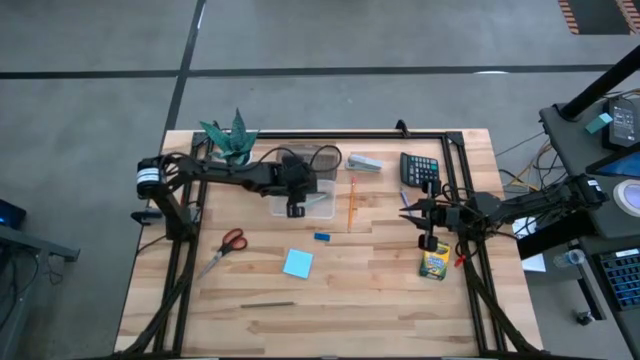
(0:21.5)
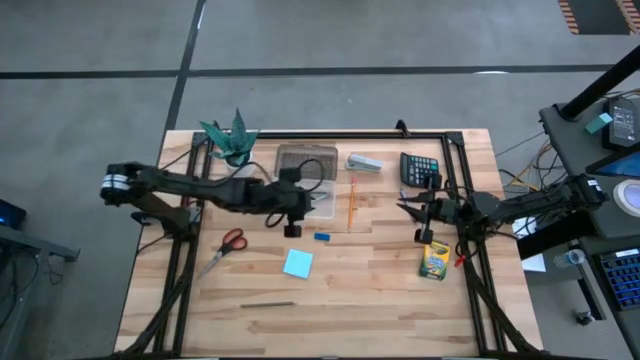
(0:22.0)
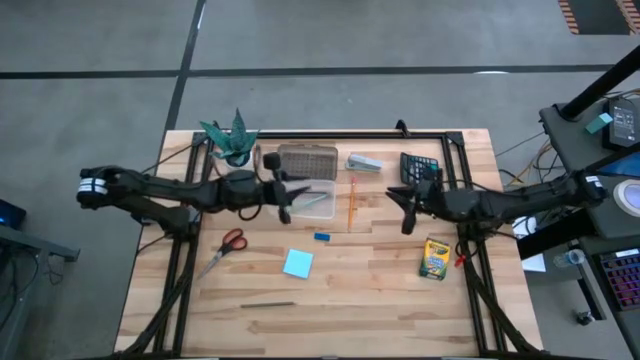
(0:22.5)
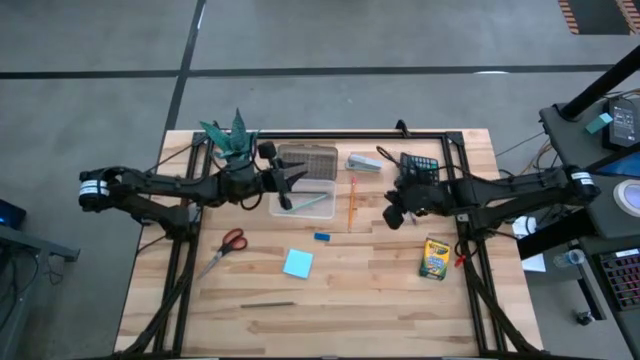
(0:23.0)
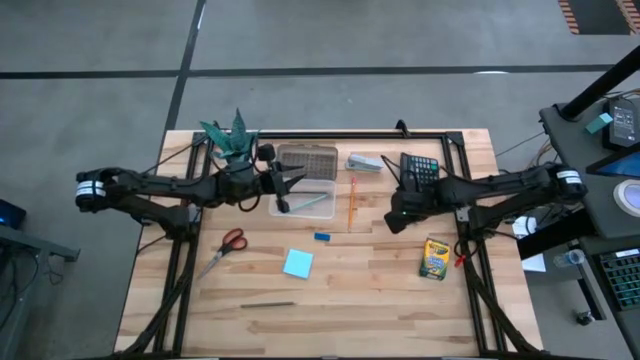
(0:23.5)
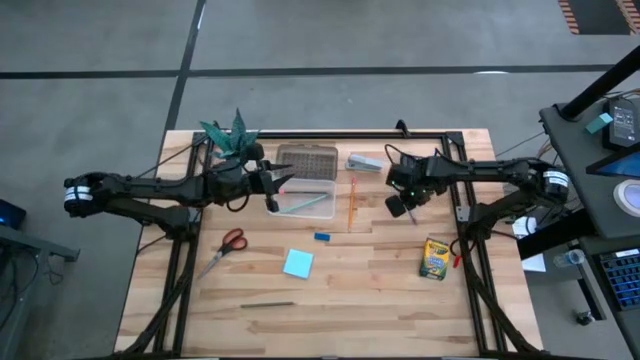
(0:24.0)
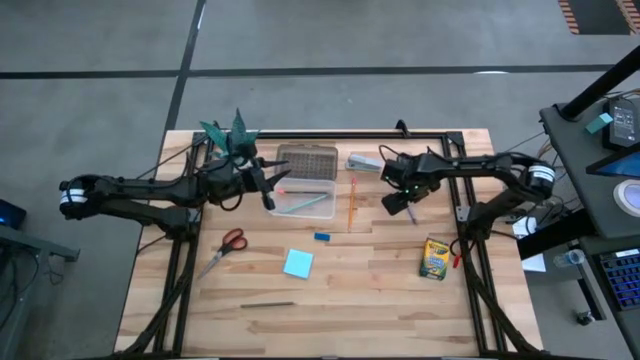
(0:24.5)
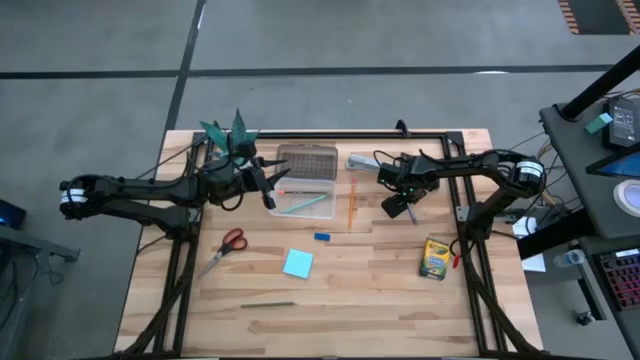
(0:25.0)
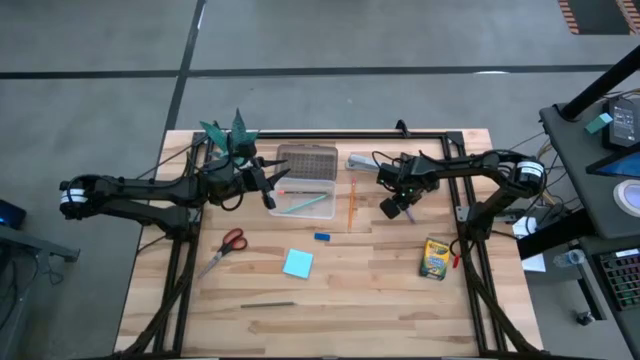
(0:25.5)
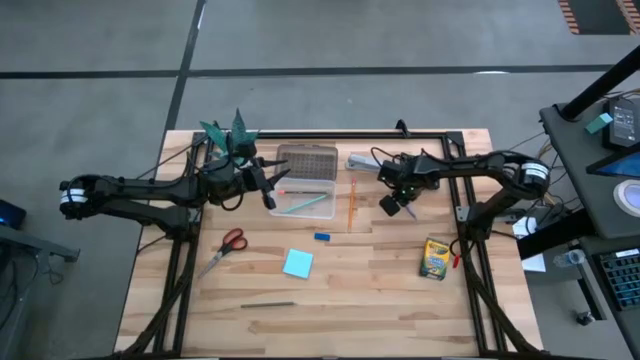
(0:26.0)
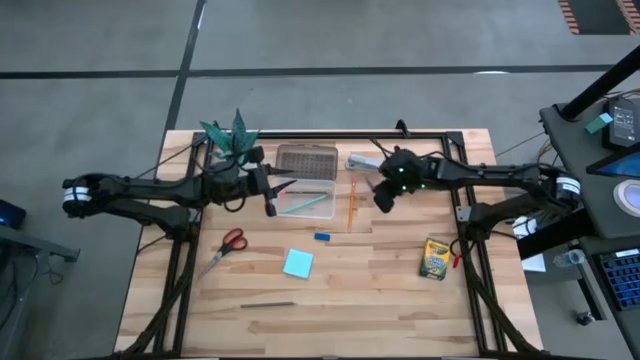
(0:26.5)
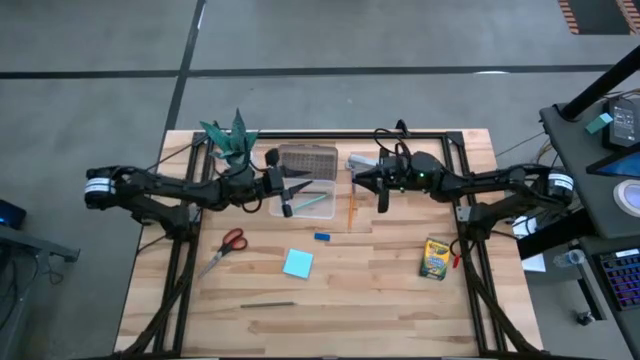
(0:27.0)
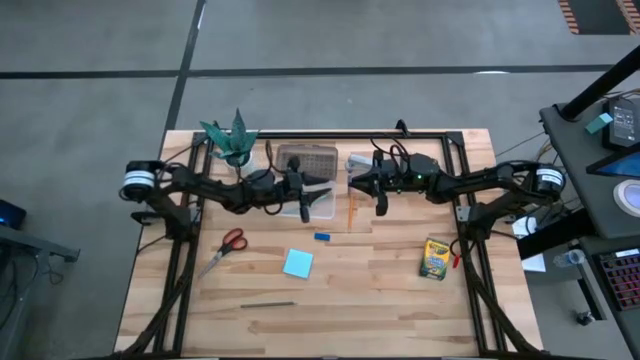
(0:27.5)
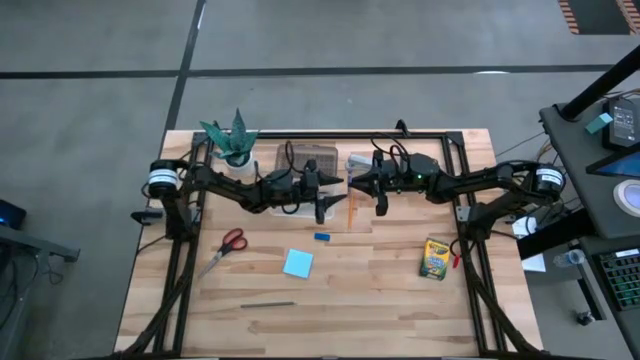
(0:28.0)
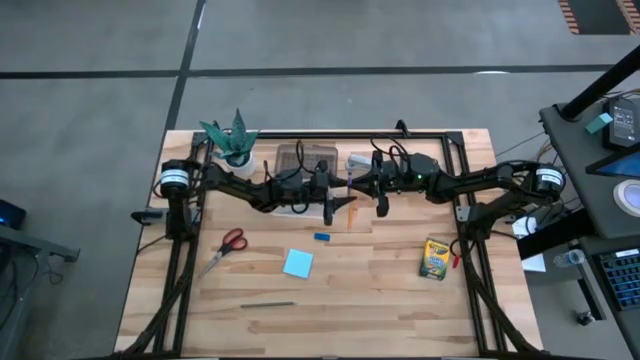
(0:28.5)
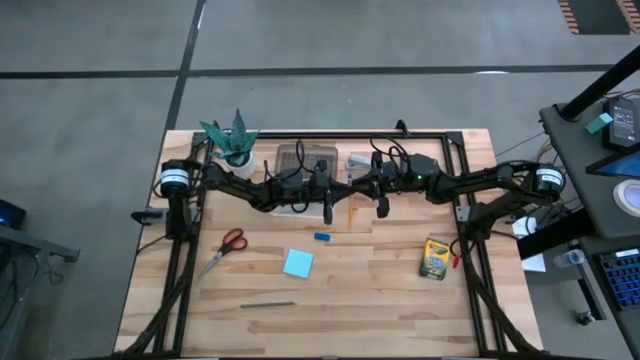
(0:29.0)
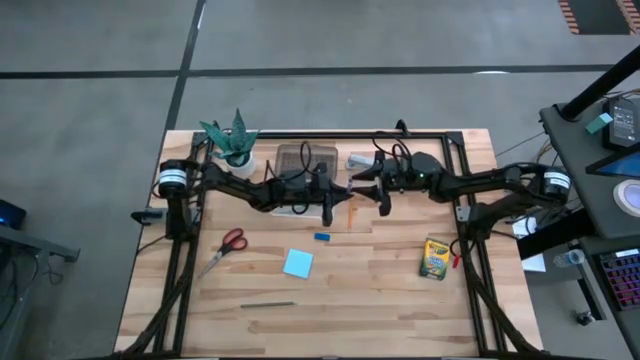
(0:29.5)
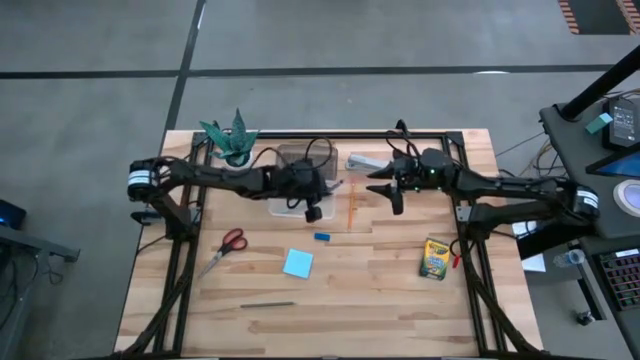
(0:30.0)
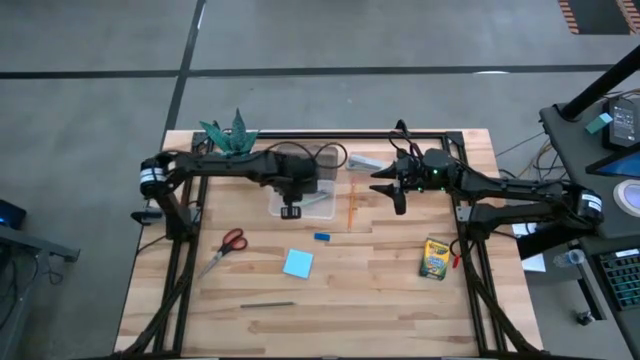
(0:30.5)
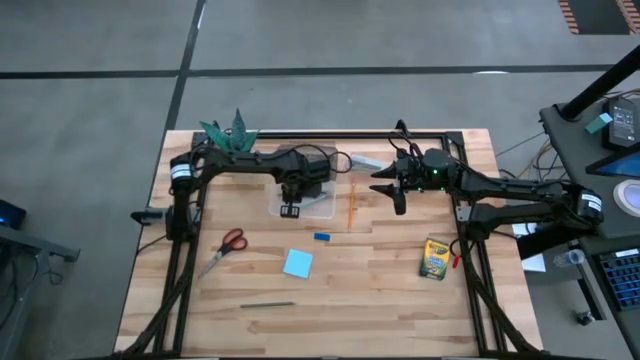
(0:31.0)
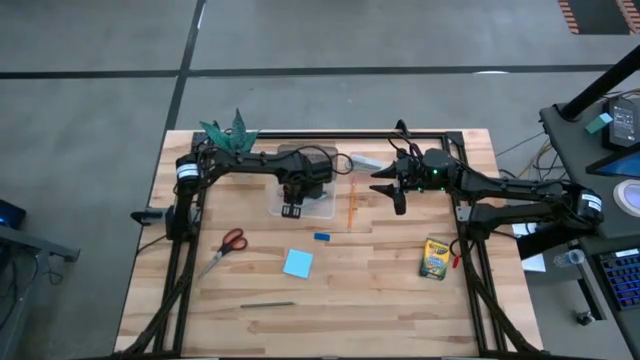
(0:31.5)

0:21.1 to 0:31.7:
Task: Pack school essentials
Put the purple pen into the supply box

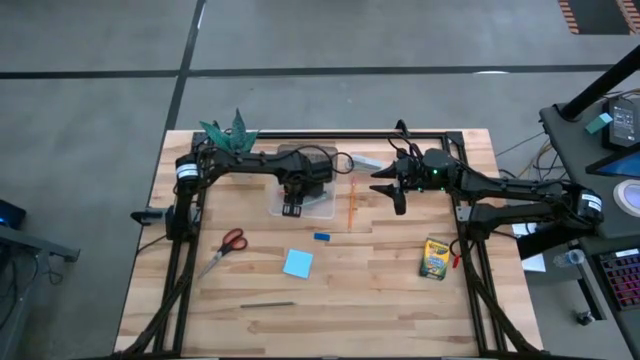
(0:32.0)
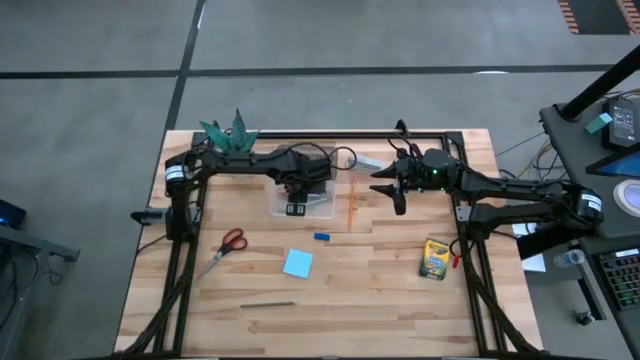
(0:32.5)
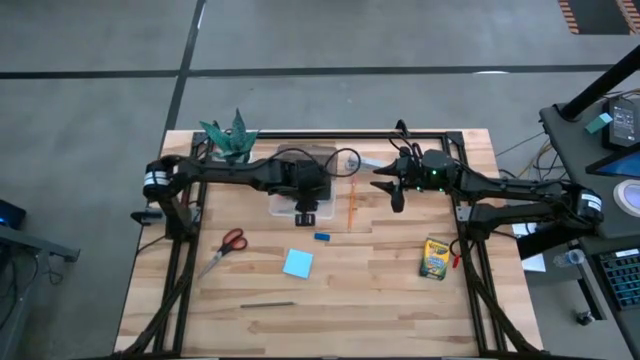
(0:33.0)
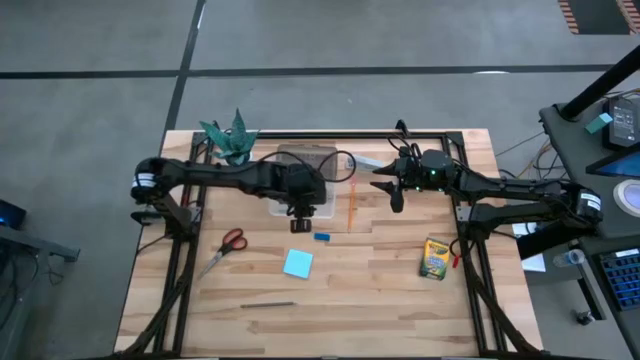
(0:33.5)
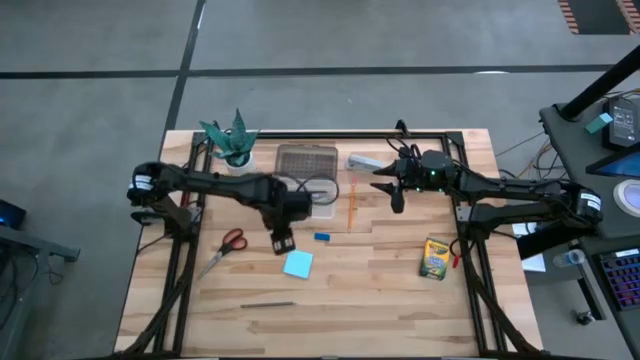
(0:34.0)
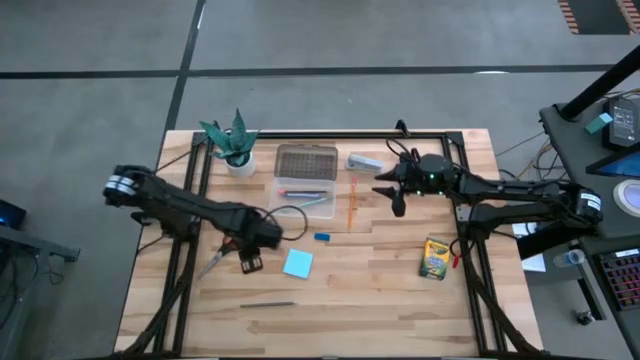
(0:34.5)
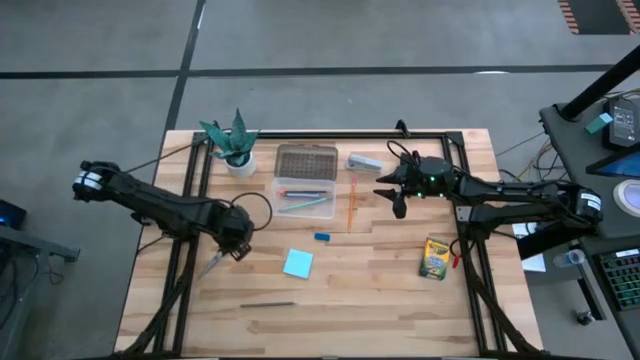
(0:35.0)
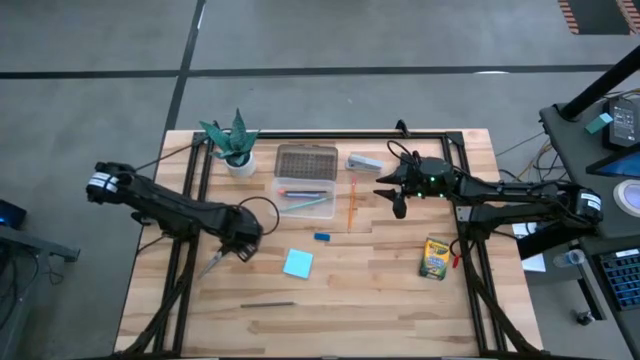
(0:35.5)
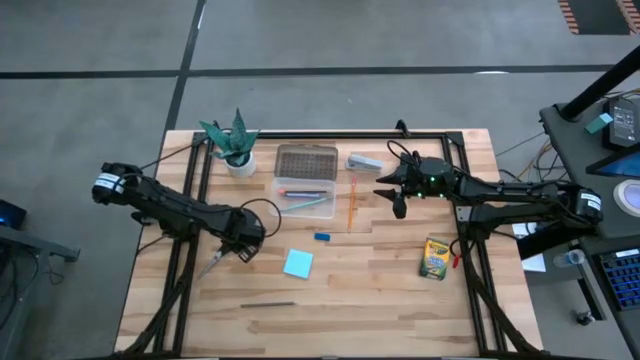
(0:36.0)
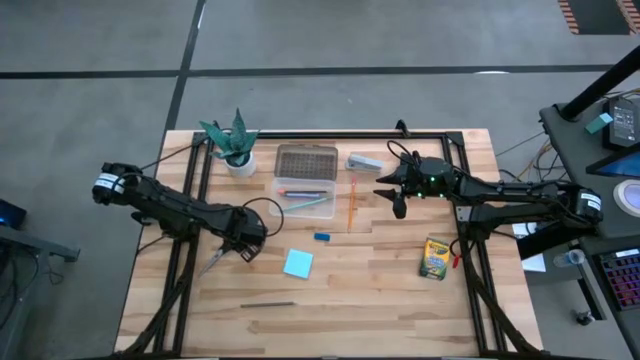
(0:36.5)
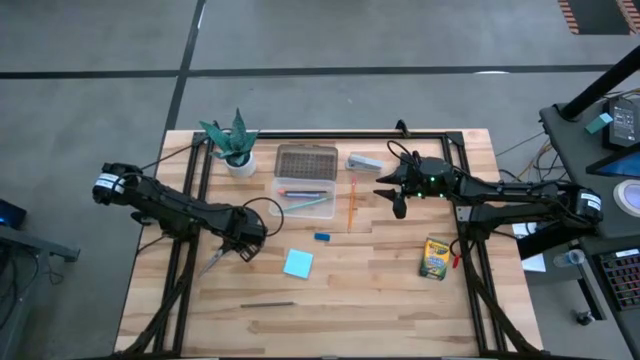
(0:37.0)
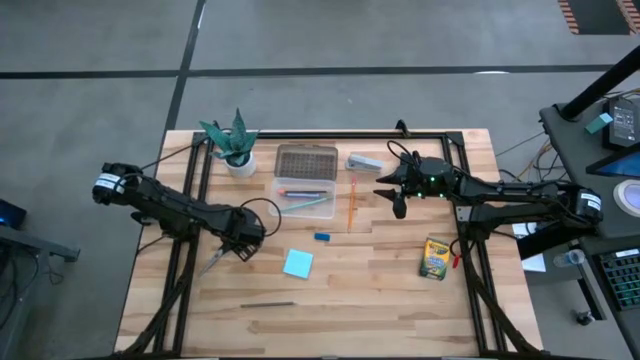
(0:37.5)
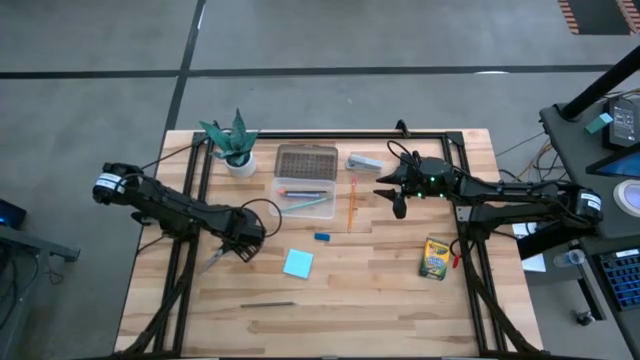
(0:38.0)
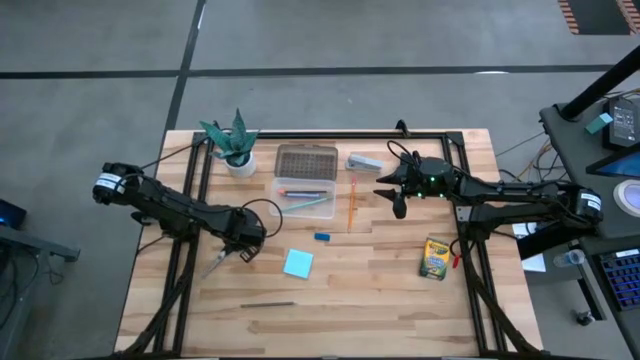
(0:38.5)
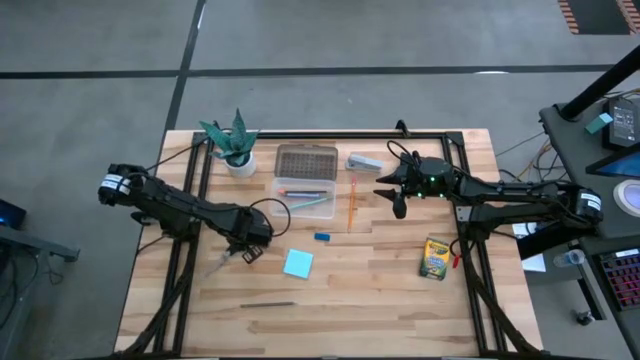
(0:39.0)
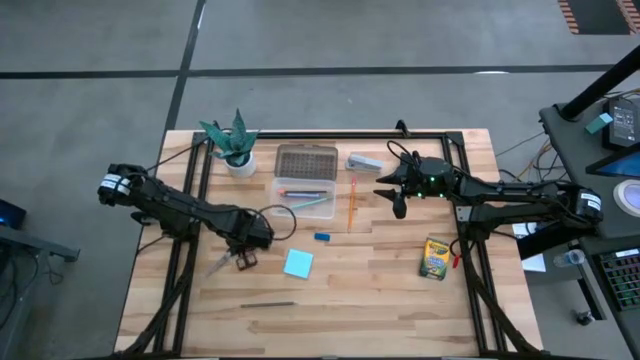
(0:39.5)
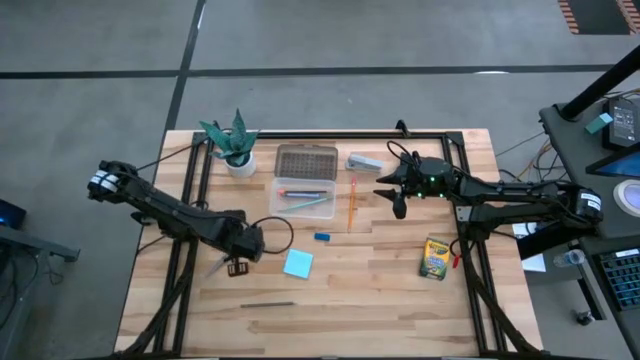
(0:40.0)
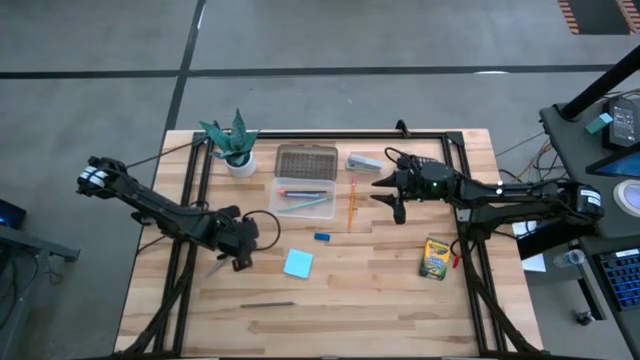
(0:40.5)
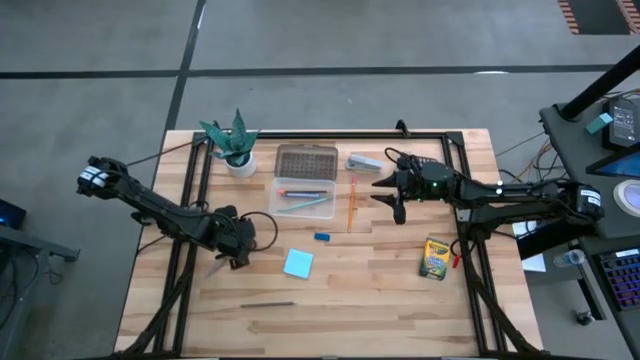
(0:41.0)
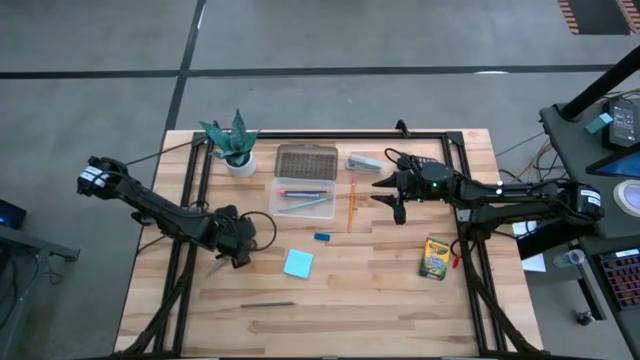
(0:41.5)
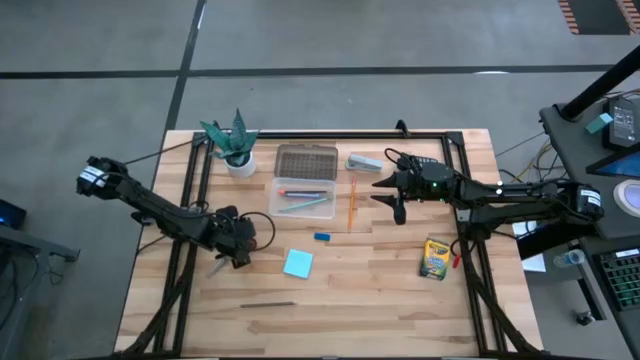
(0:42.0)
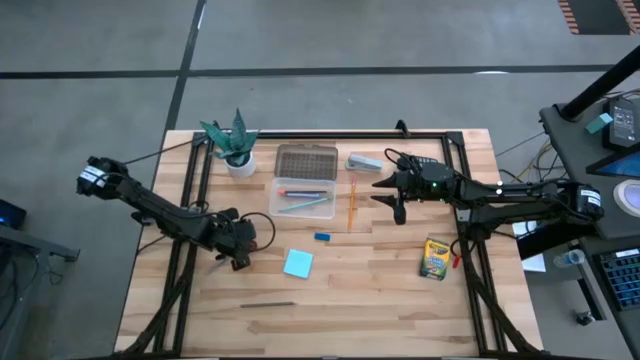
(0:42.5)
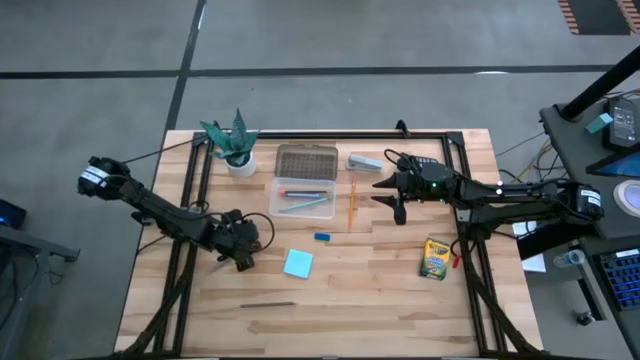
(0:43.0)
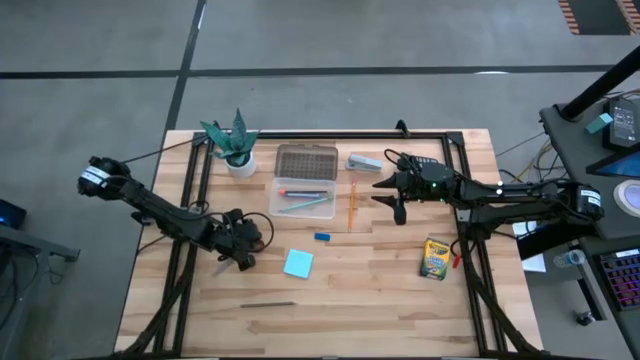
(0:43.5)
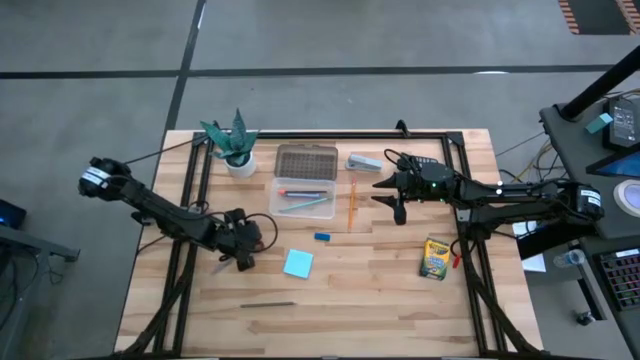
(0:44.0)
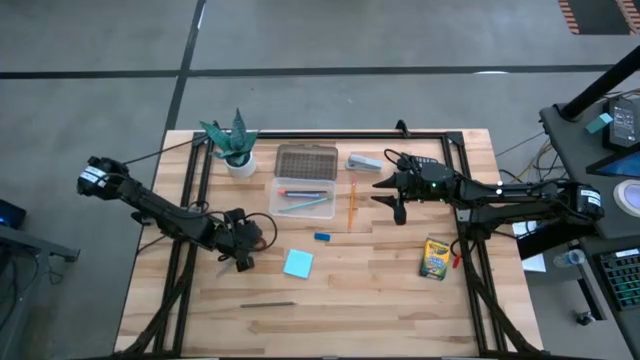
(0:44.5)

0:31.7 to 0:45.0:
Put the black scissors into the supply box
